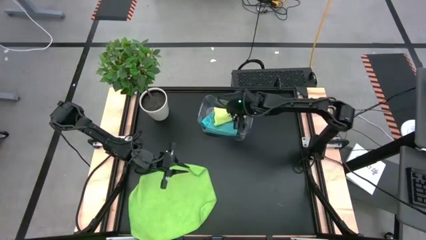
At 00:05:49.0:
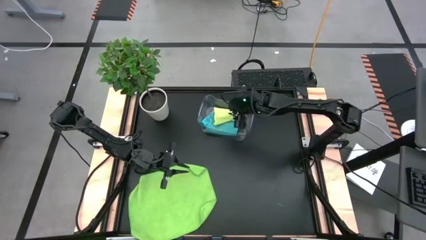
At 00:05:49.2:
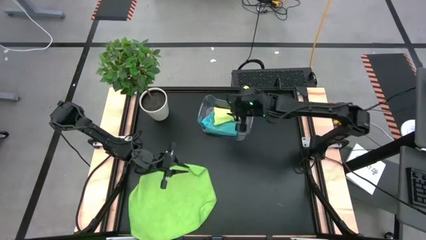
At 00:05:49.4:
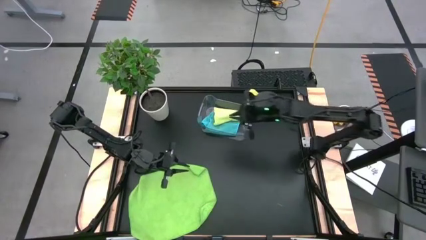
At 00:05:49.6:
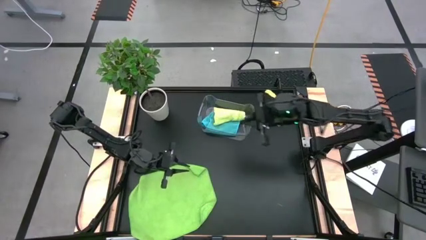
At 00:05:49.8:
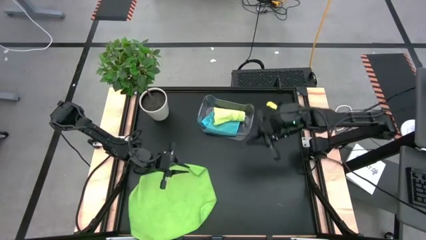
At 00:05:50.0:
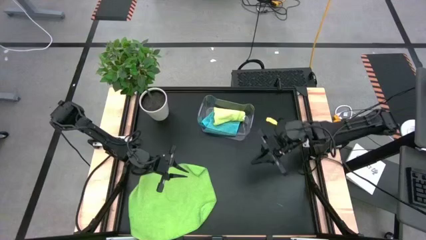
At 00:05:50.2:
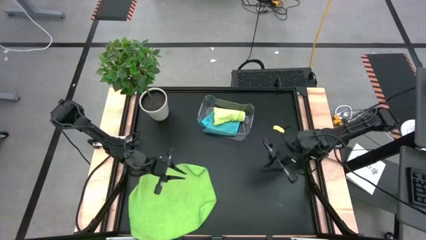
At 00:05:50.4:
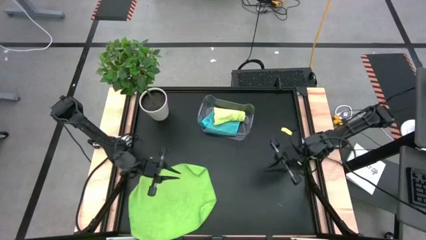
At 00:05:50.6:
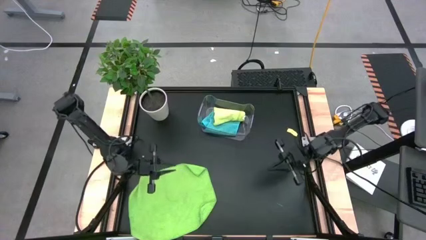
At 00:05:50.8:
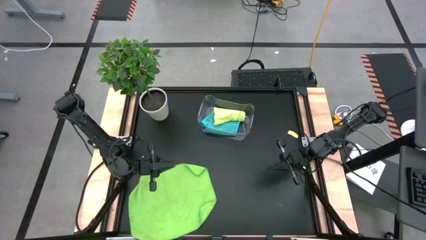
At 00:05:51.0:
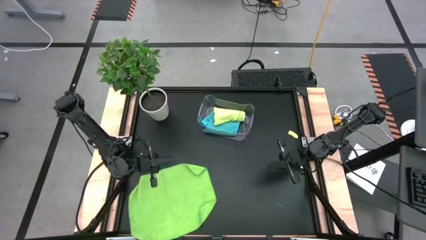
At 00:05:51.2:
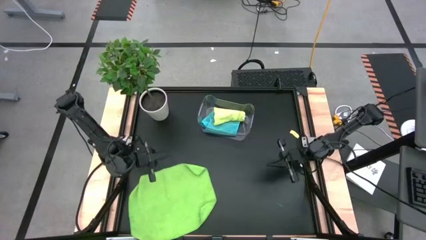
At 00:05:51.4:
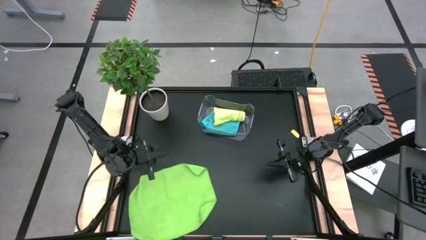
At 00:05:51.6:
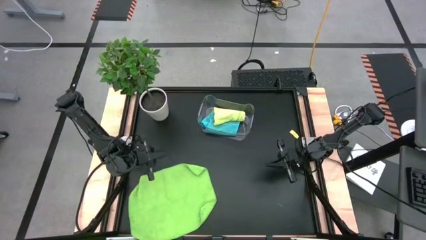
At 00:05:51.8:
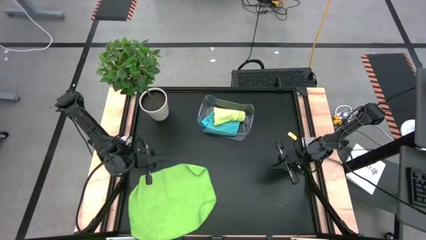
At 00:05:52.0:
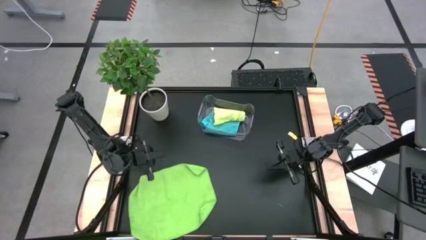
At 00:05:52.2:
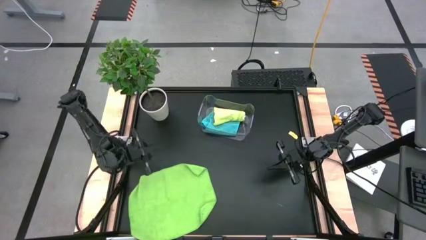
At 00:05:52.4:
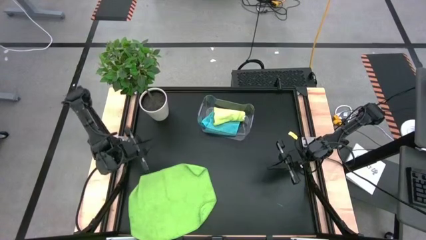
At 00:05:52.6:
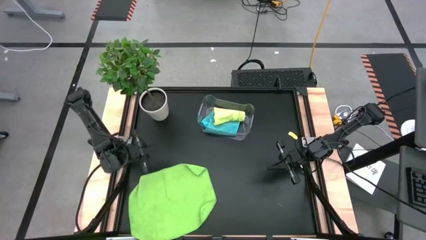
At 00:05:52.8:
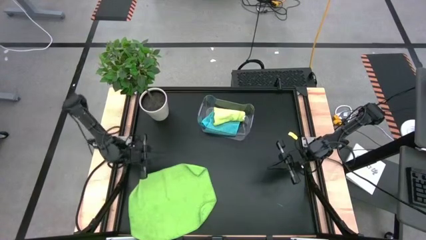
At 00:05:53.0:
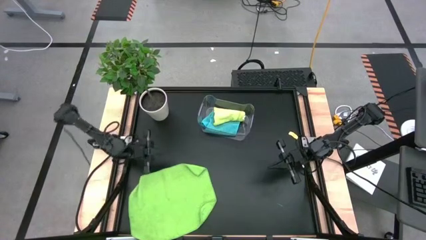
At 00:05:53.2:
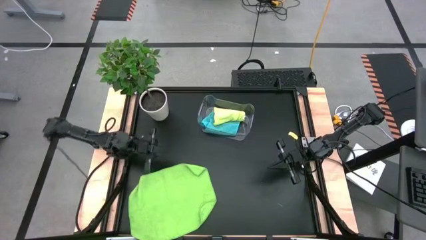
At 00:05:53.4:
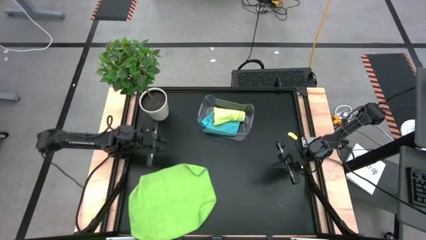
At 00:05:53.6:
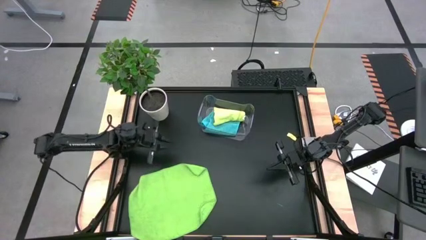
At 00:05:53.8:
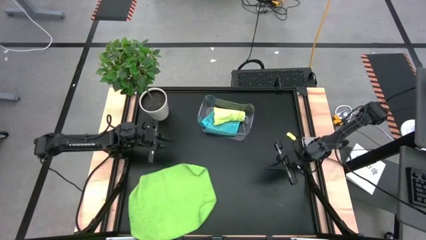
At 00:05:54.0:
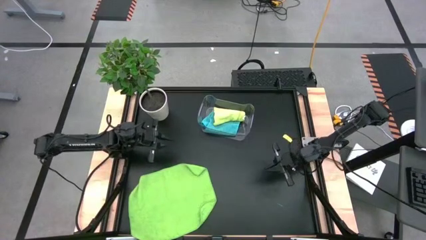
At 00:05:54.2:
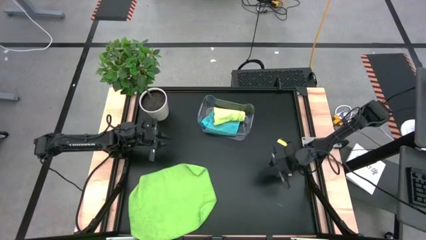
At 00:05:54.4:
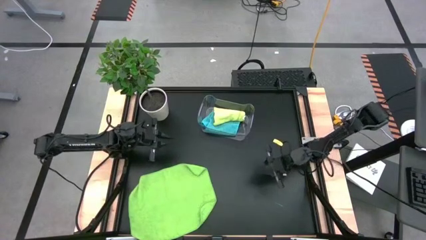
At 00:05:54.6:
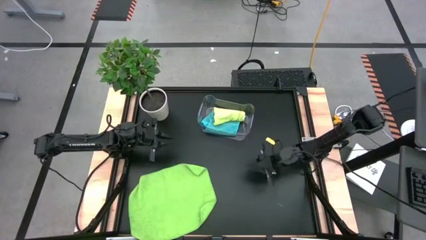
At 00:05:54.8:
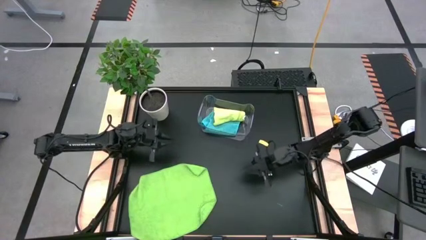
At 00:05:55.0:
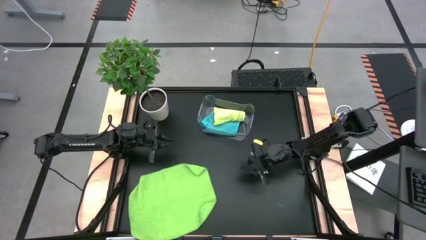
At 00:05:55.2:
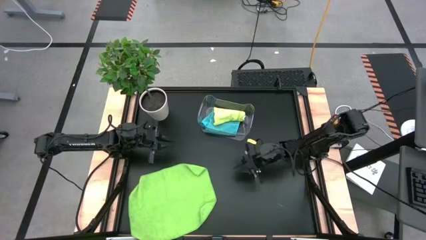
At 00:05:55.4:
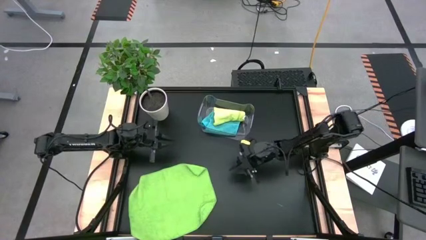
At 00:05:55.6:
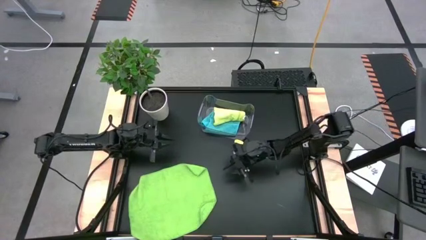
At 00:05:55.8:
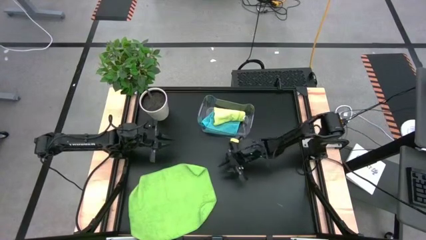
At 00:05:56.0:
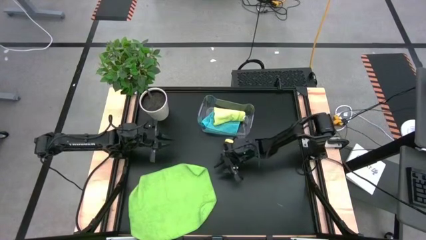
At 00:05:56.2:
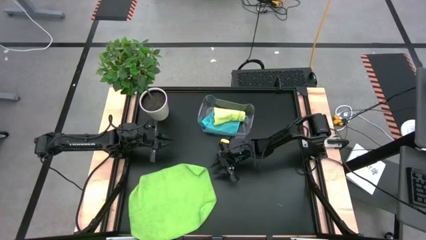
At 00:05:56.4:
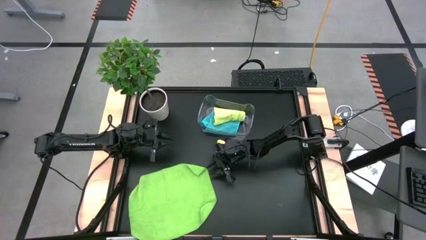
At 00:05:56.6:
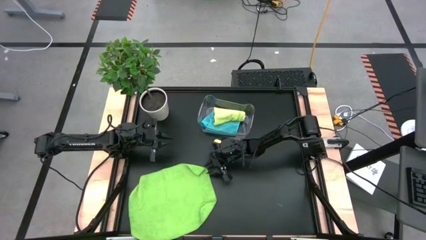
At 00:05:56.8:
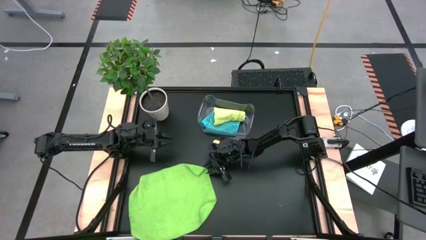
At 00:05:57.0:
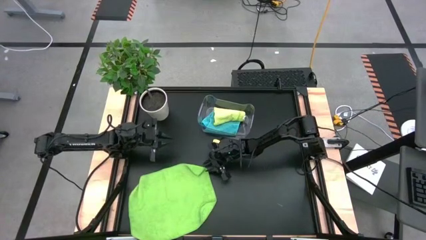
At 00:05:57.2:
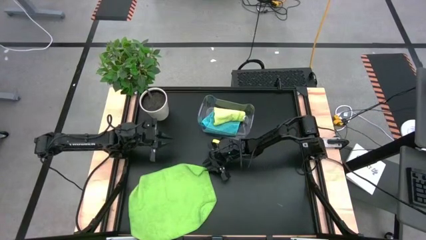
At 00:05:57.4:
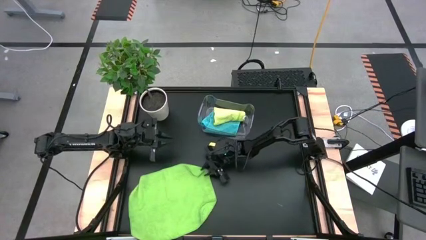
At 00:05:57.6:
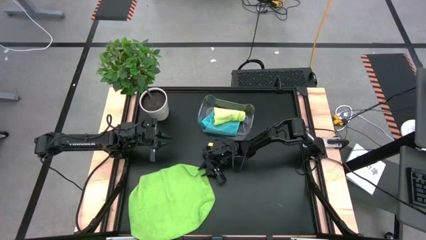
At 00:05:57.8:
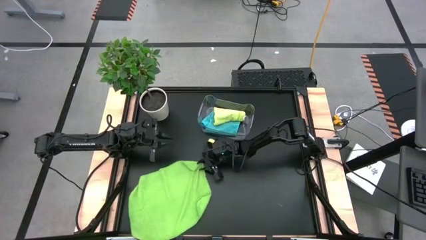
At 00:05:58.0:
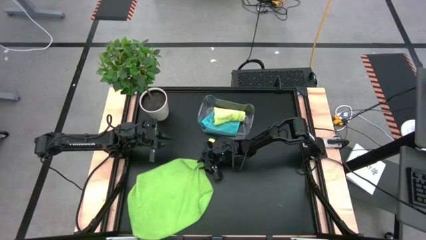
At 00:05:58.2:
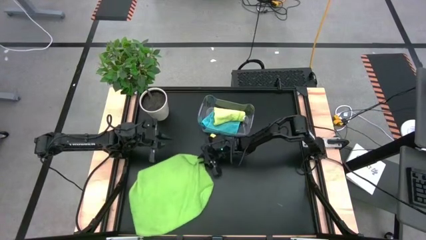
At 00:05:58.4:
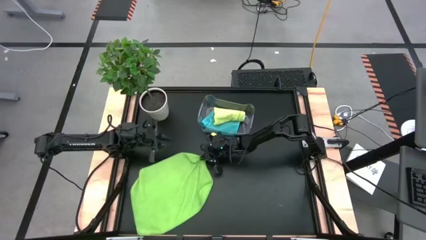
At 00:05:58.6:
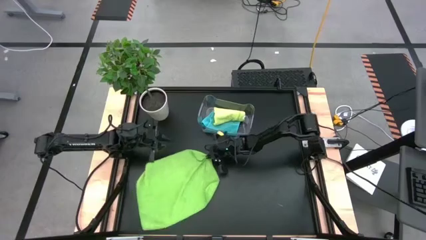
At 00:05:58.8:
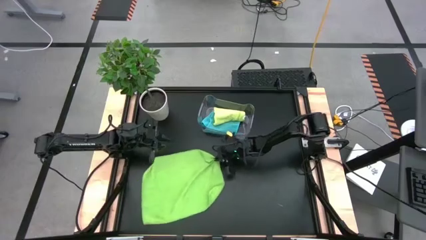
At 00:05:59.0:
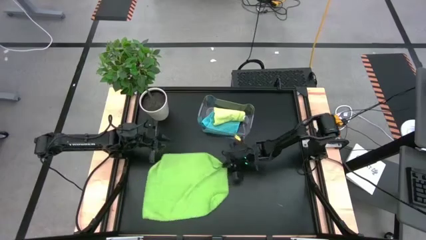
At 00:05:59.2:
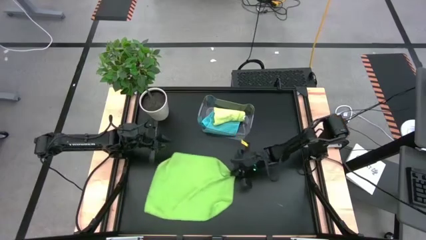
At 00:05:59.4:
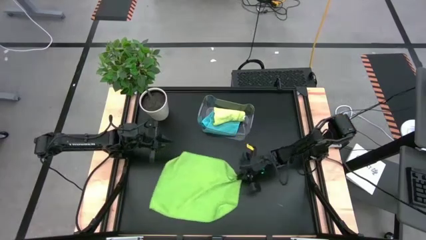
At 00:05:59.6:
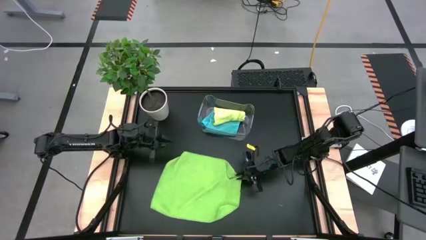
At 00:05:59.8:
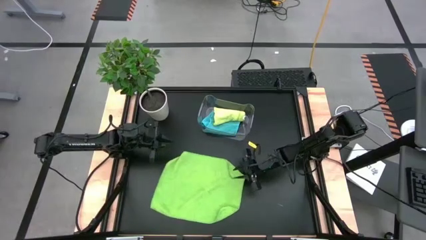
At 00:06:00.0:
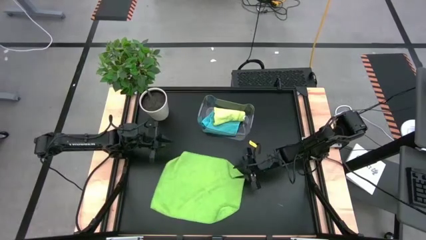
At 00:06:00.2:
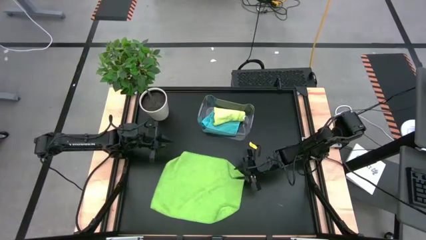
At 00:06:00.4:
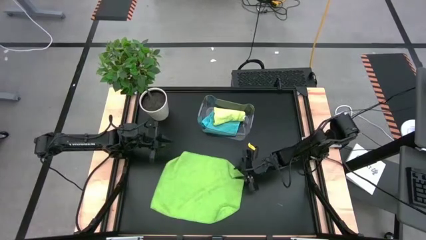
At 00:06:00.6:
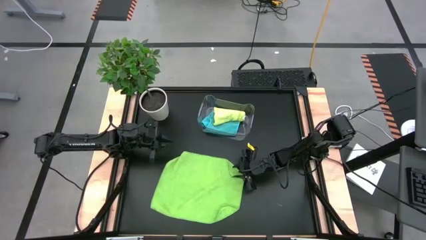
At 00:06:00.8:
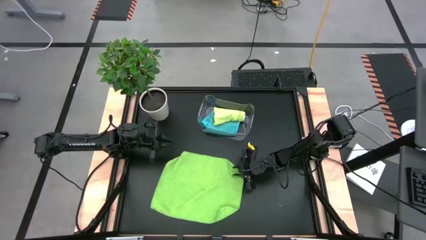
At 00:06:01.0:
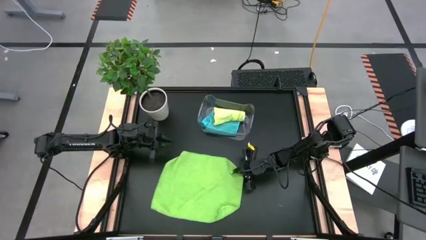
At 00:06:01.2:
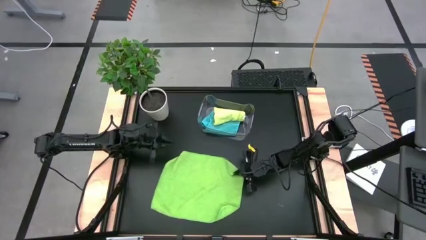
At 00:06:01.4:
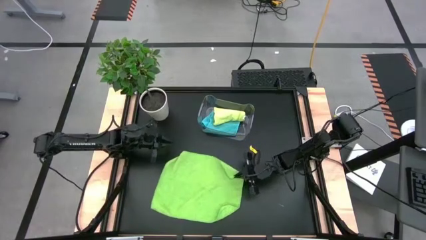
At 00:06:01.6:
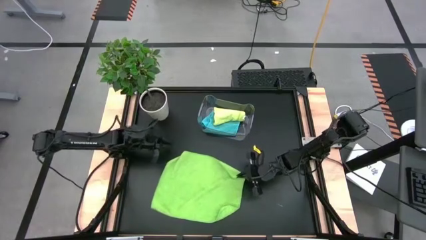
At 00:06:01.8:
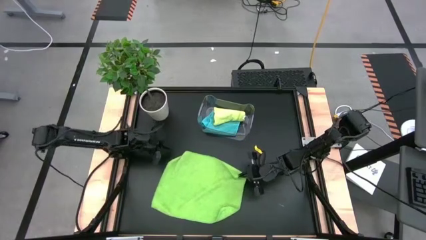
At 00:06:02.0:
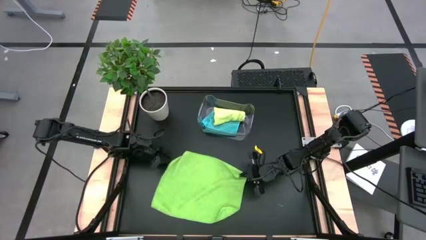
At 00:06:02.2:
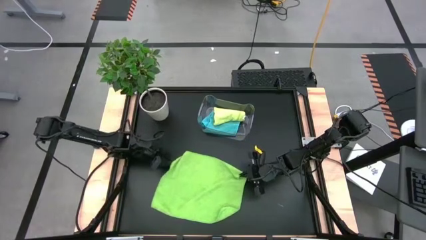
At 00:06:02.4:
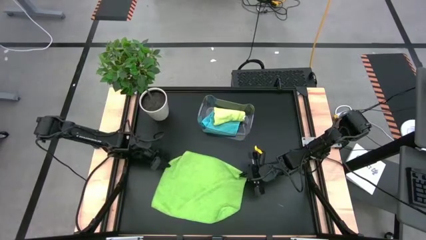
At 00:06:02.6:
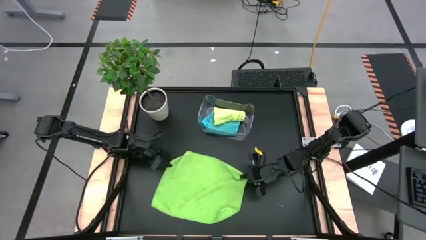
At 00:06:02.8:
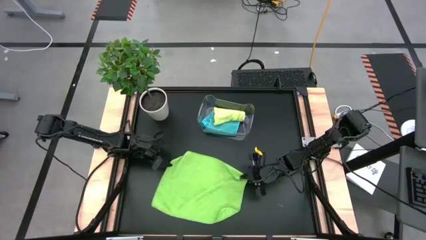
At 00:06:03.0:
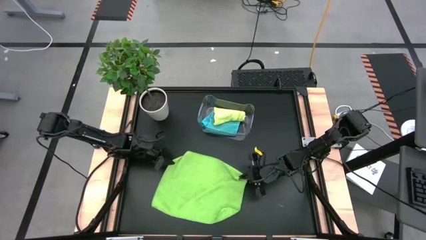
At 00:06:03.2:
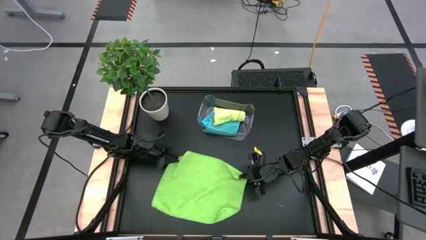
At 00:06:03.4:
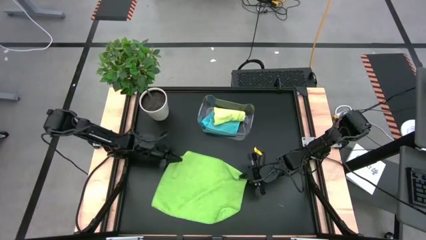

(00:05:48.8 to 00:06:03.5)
Task: Fold microfiber towels
Fold the green towel

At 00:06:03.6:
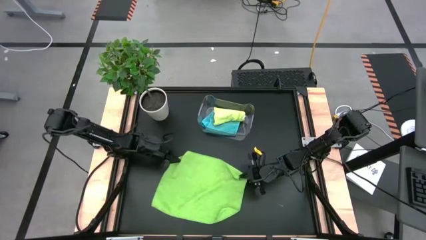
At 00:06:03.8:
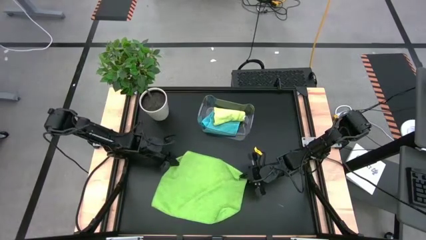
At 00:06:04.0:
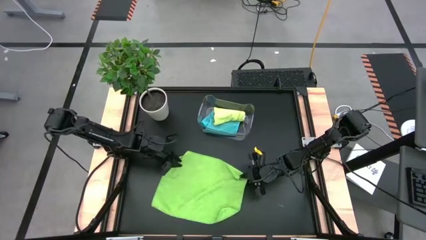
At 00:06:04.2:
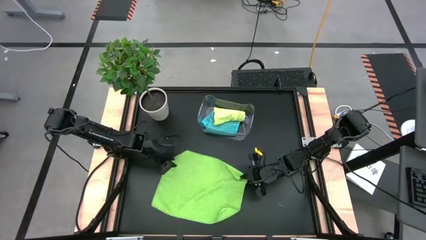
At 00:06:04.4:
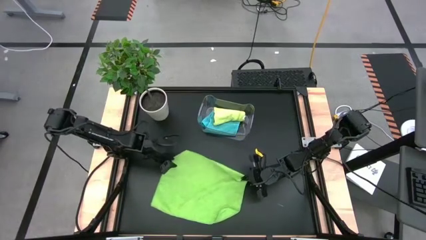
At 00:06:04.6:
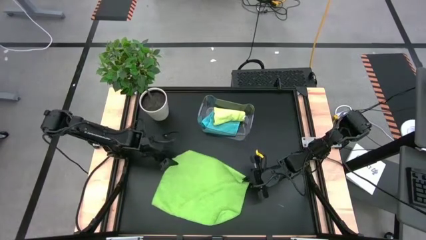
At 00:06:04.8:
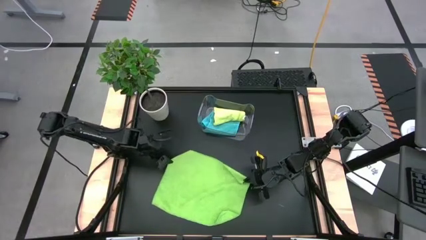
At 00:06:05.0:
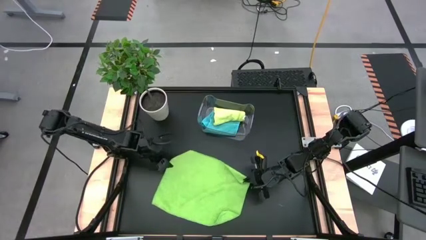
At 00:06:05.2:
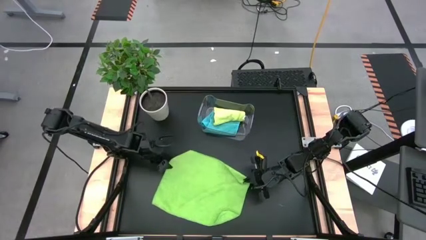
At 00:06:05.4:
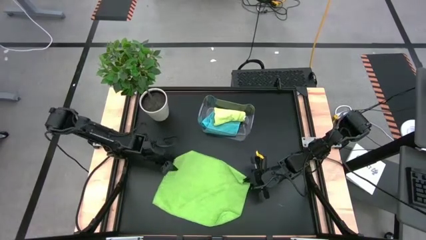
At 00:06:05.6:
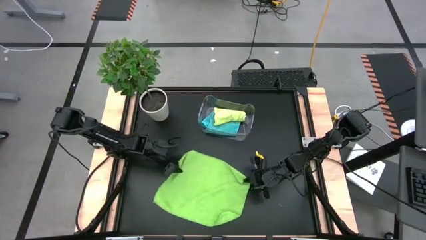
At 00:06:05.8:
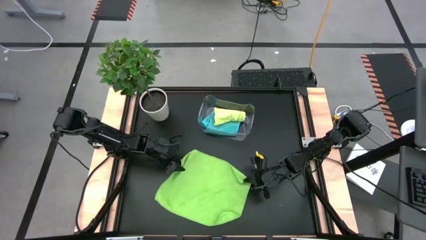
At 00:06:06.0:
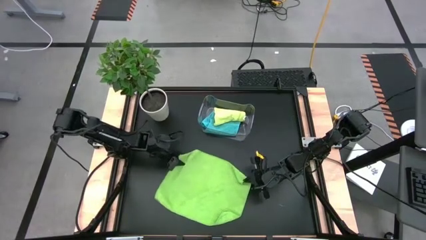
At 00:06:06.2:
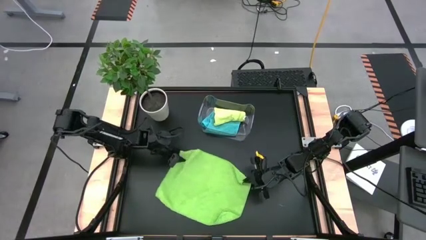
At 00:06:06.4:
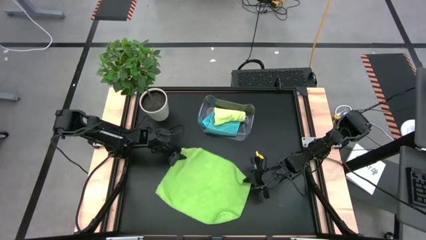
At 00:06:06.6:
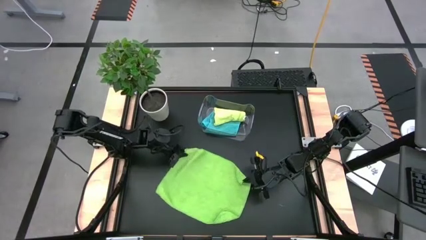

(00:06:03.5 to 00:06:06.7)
Fold the green towel
